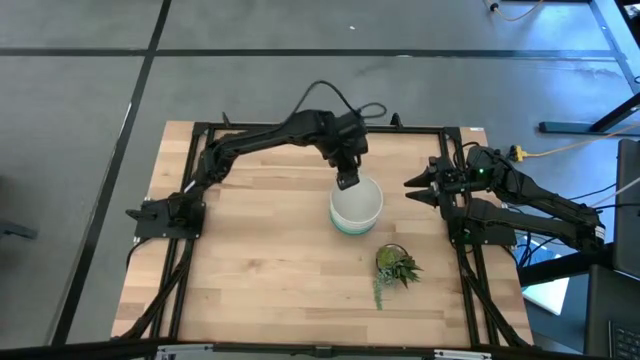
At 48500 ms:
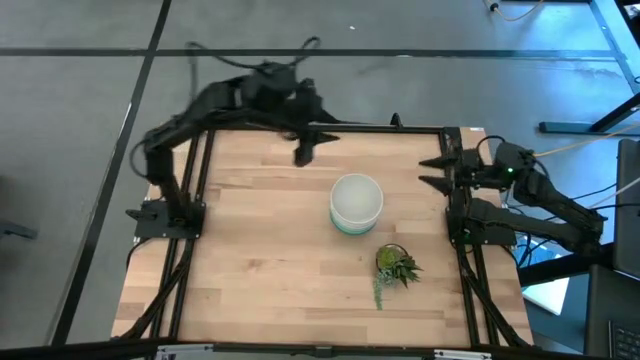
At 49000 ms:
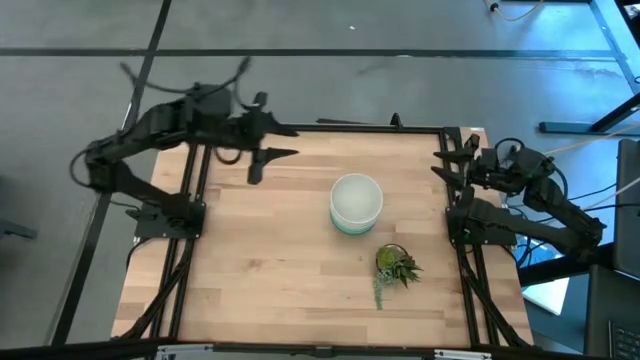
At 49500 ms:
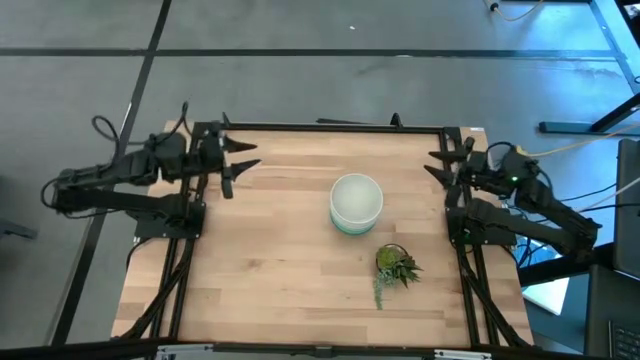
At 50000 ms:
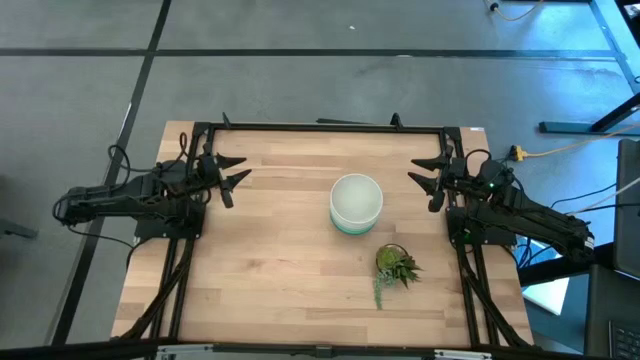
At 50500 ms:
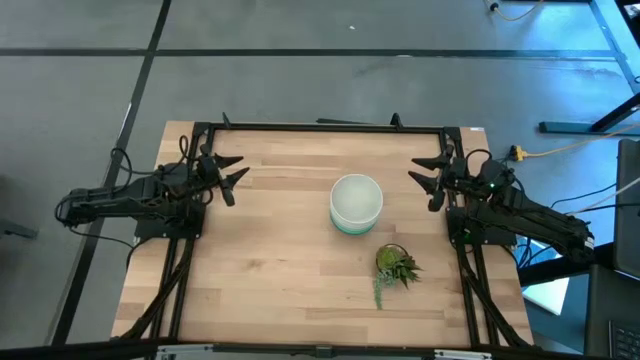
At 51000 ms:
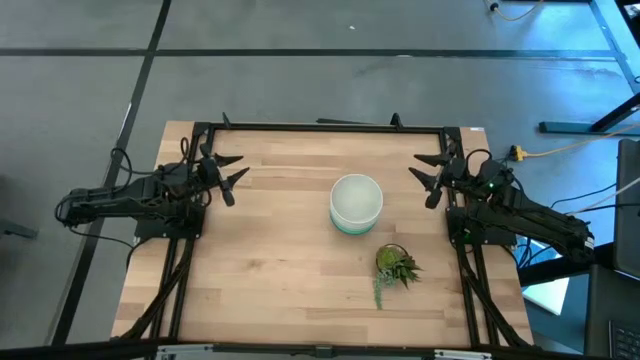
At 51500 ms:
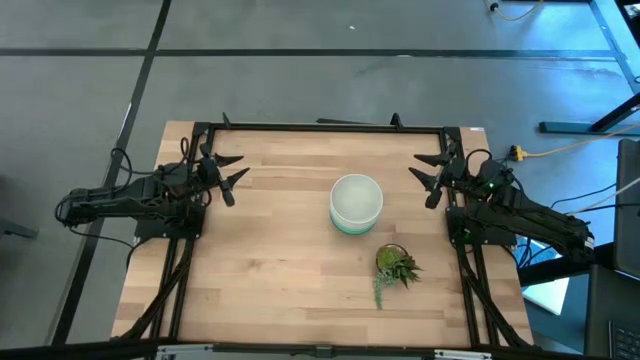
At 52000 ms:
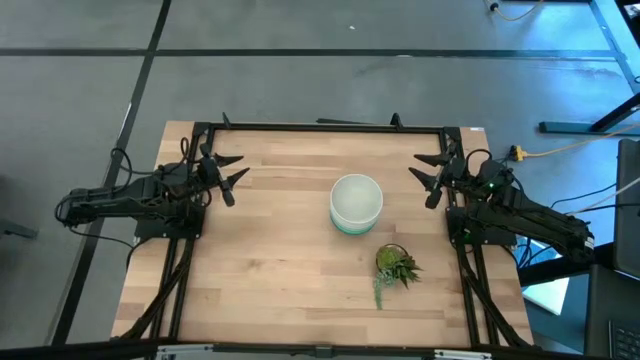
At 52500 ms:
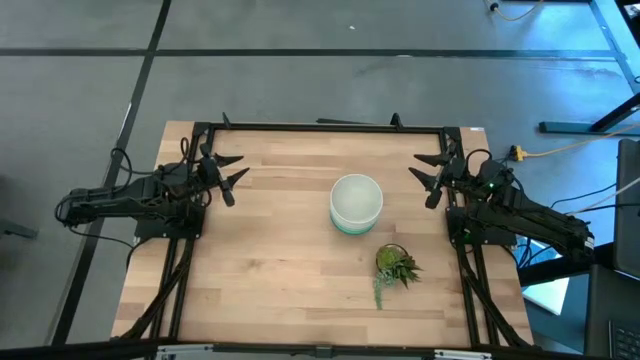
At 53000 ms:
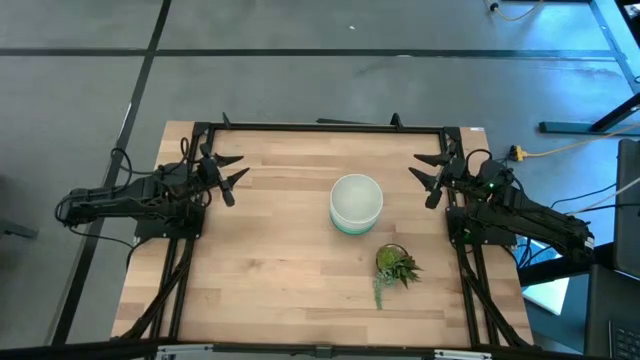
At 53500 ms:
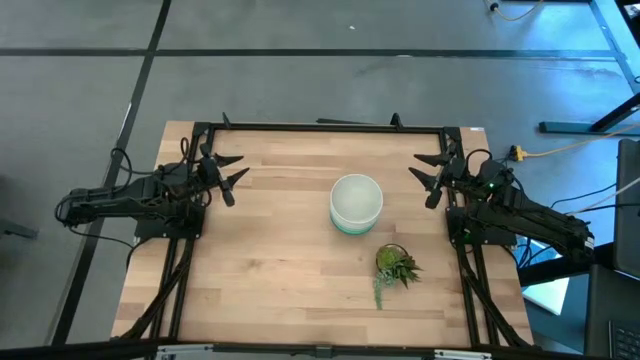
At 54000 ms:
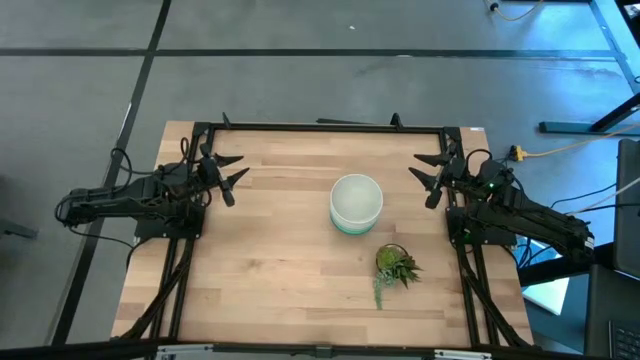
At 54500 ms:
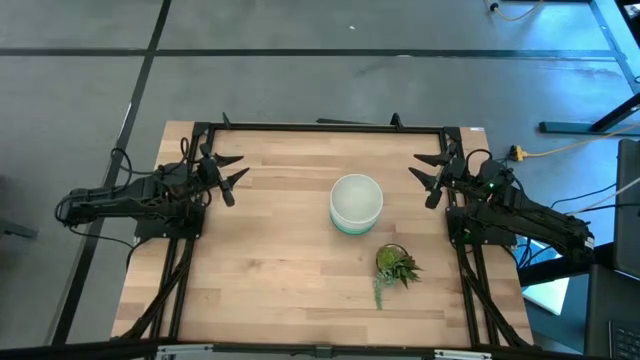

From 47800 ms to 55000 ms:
Task: Nest bowls inside each other
Return to Home Position

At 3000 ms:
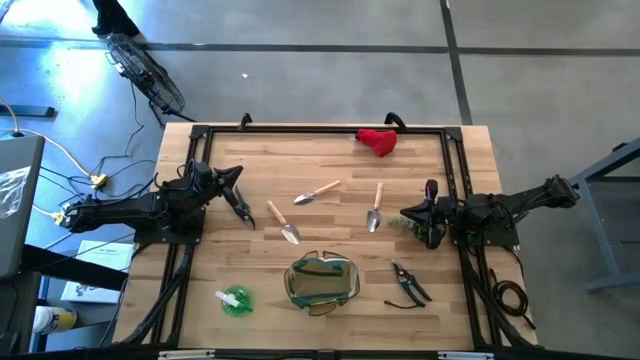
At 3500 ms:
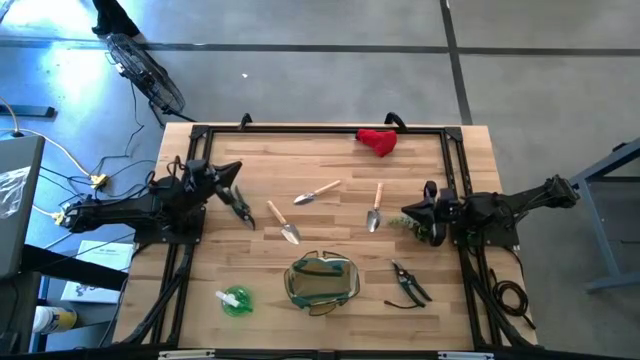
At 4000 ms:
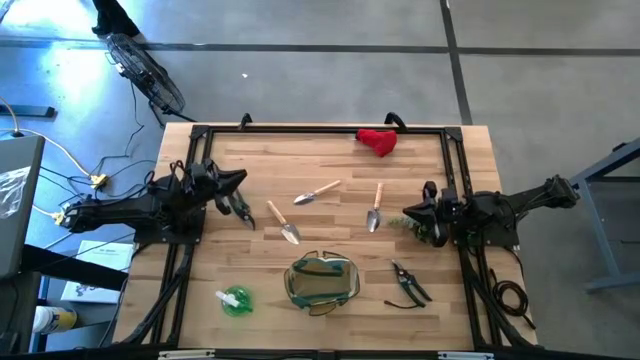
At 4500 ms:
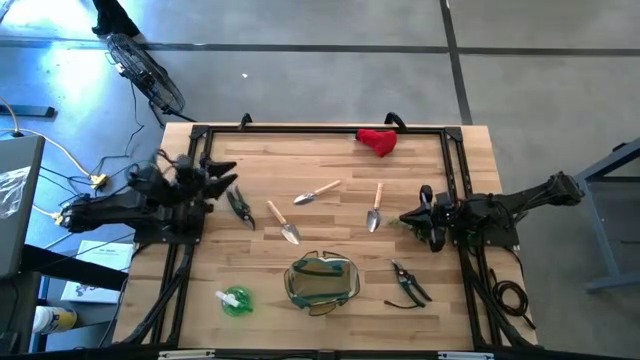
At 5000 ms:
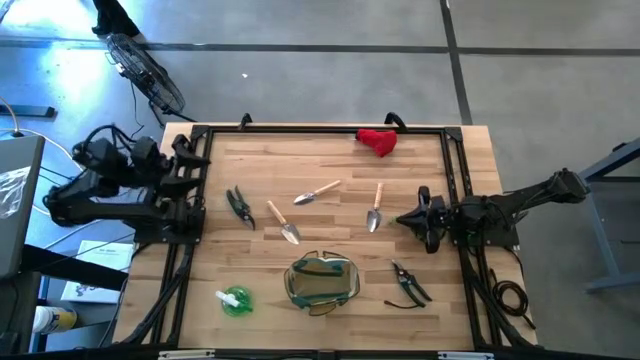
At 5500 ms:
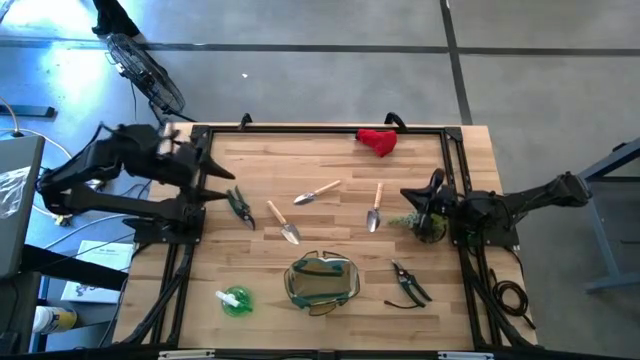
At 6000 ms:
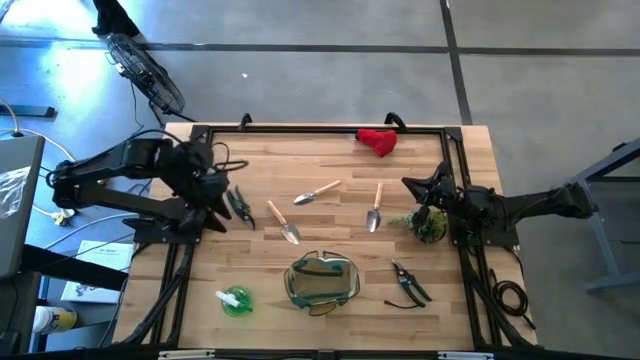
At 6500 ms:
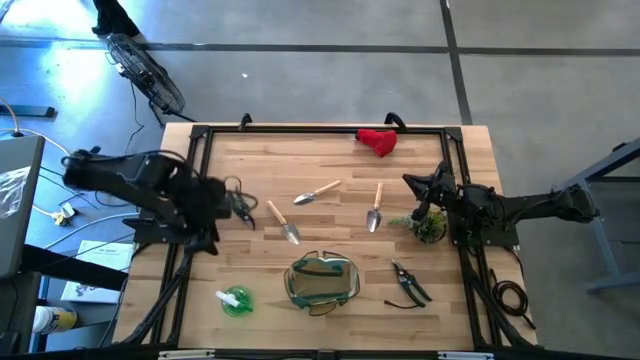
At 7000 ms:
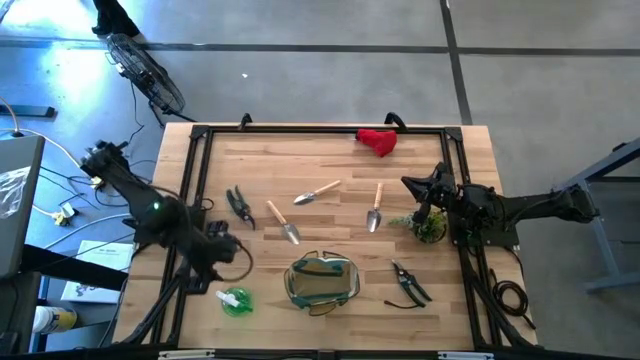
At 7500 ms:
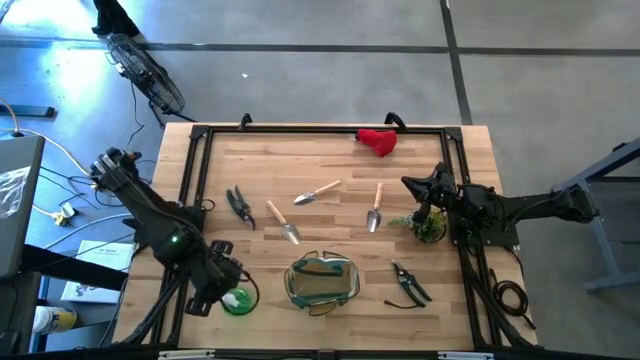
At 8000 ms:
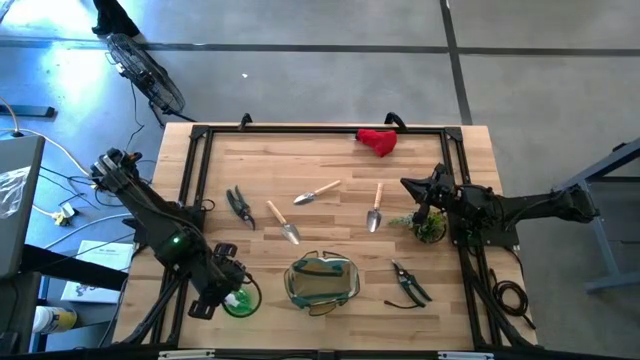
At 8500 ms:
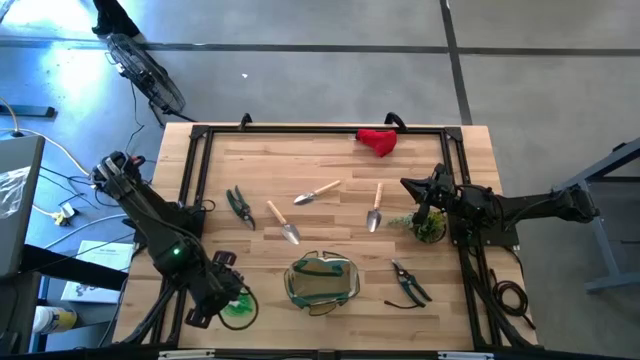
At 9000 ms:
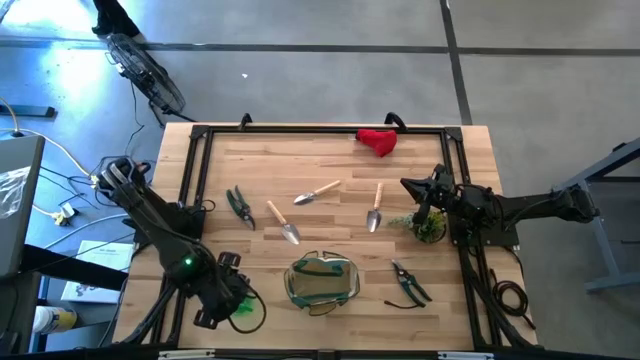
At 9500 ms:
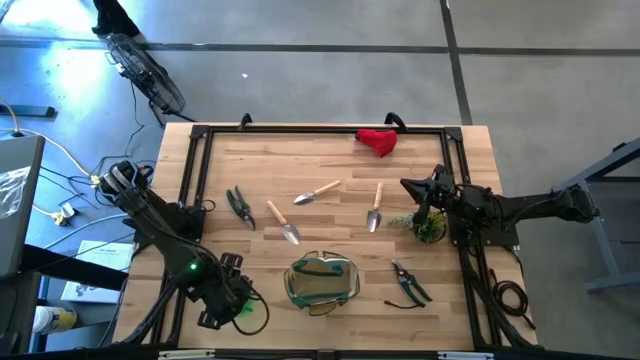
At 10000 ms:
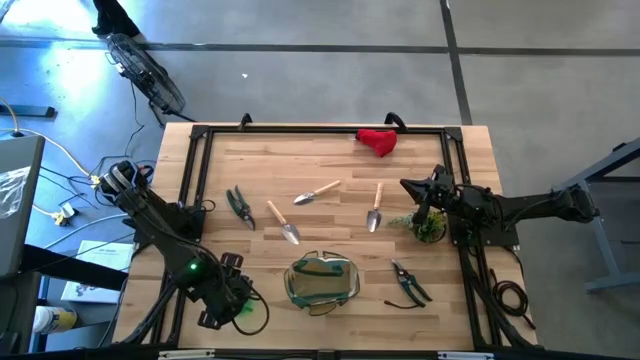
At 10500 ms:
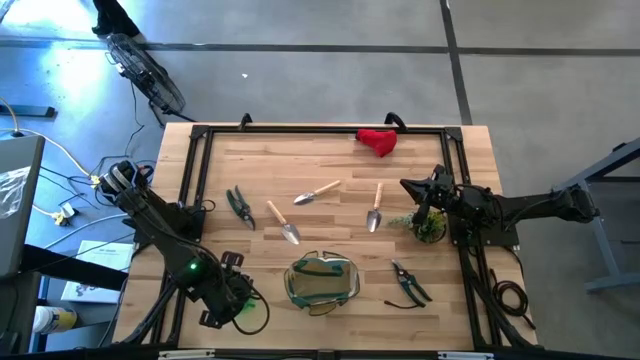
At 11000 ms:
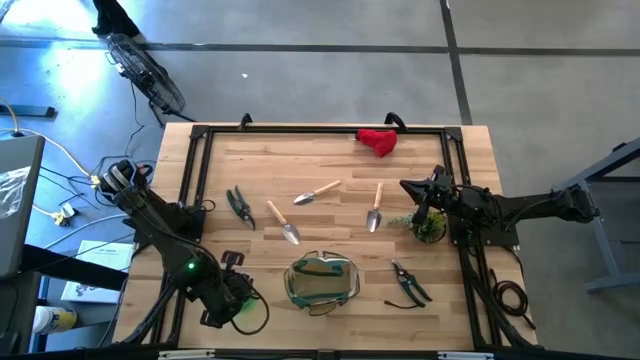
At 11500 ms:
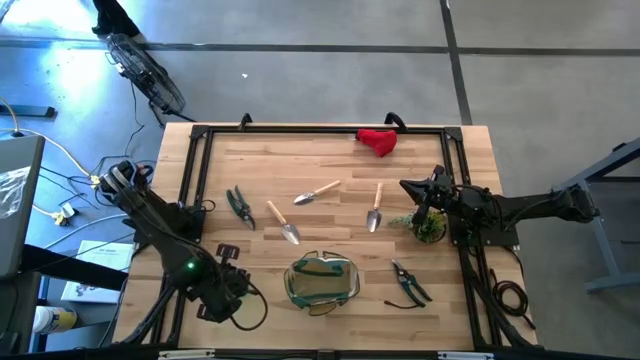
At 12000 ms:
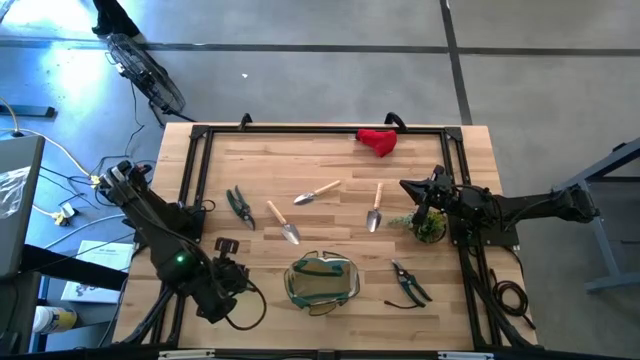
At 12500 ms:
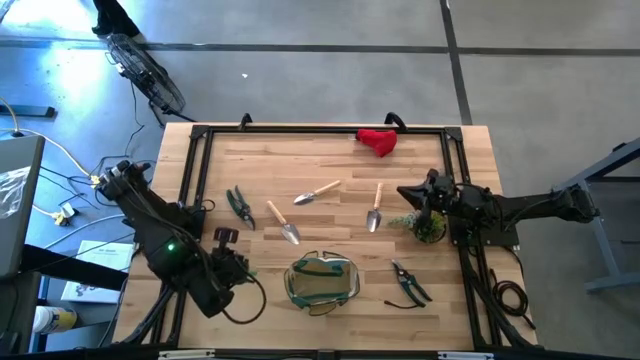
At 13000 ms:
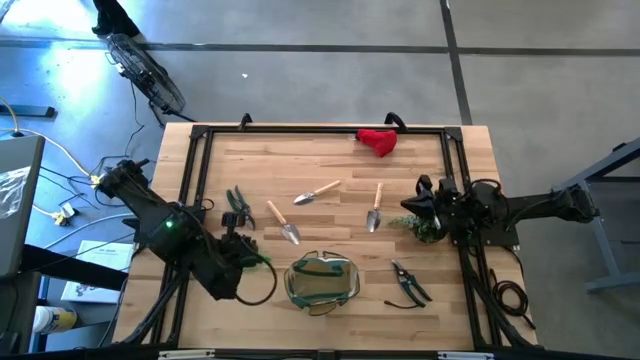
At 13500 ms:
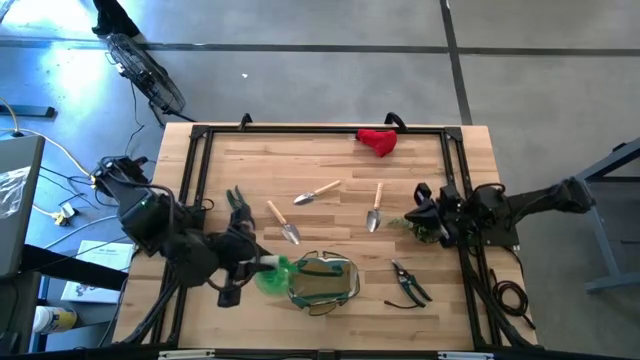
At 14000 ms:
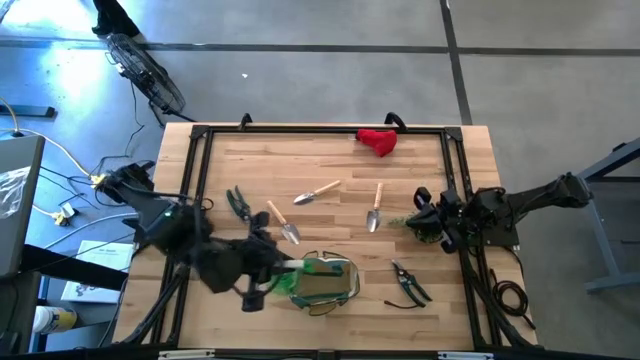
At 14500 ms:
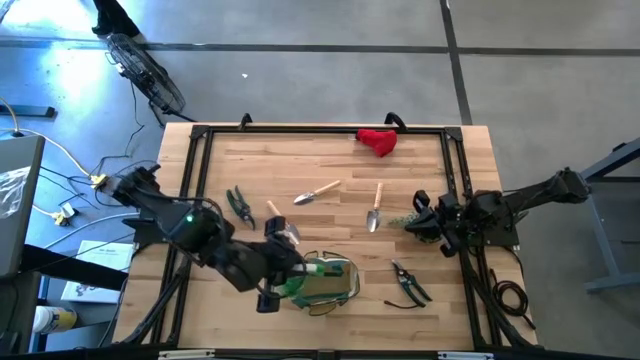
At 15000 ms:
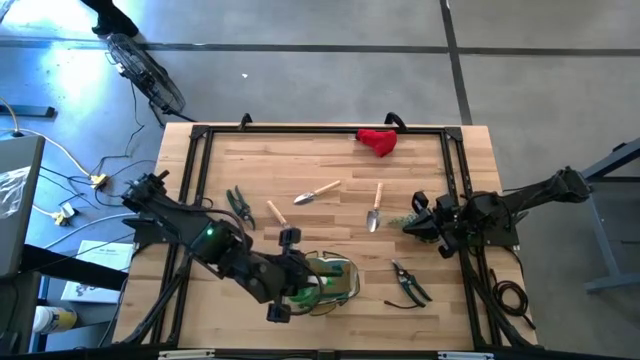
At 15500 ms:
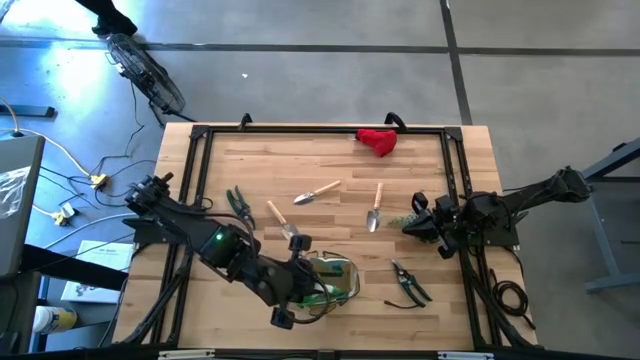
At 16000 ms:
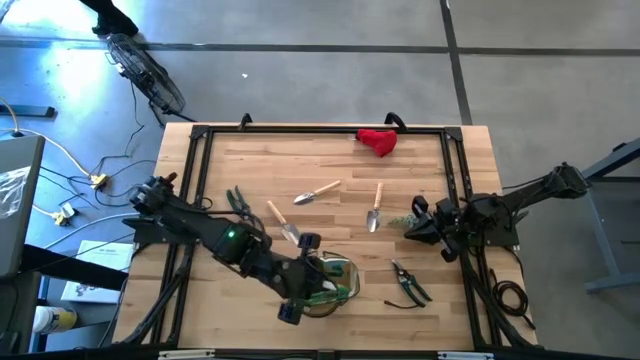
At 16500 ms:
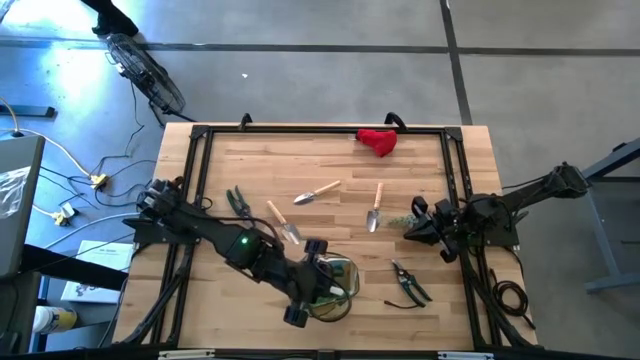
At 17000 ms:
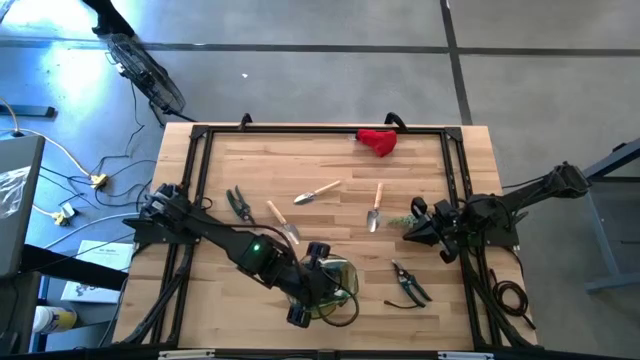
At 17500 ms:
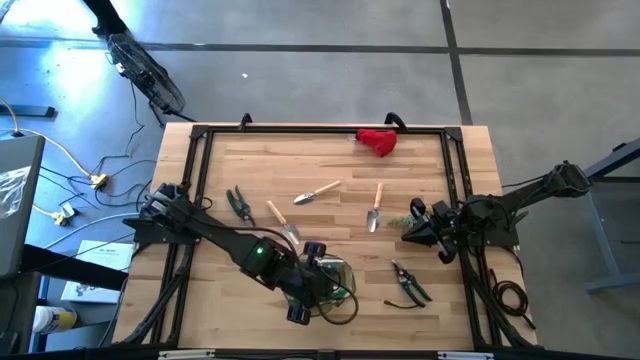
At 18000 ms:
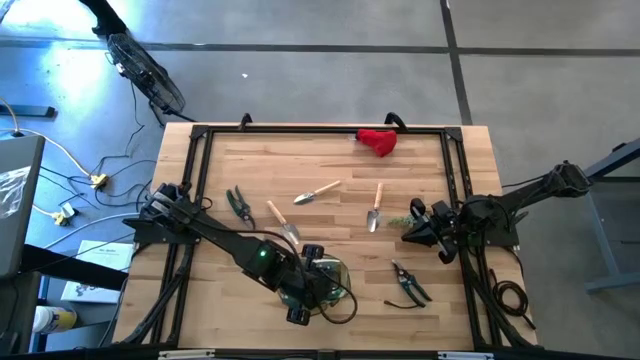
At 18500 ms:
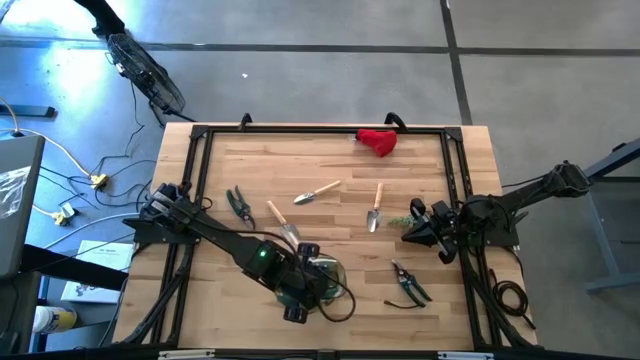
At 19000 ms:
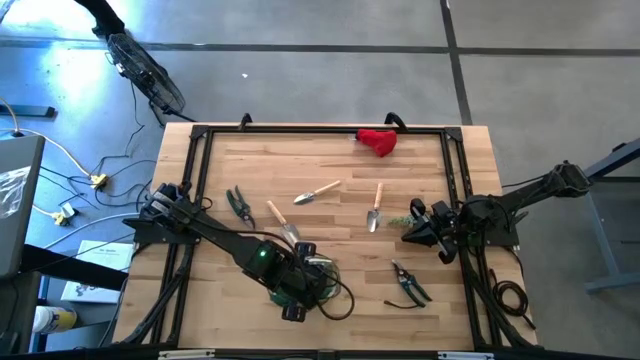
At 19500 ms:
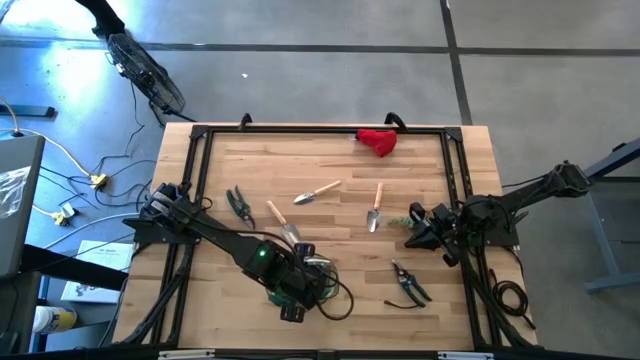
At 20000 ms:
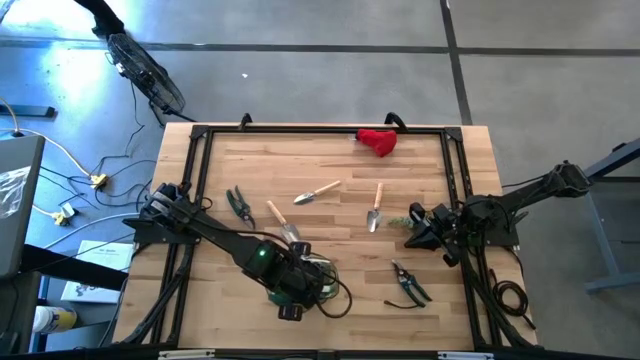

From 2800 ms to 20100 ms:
Task: Pick & Place Garden tools in Gardening bag
Put the green spray bottle into the gardening bag
